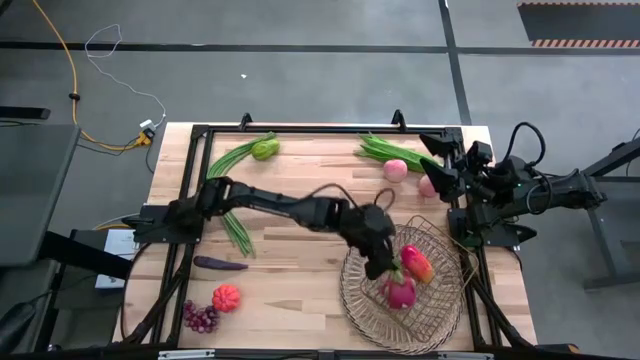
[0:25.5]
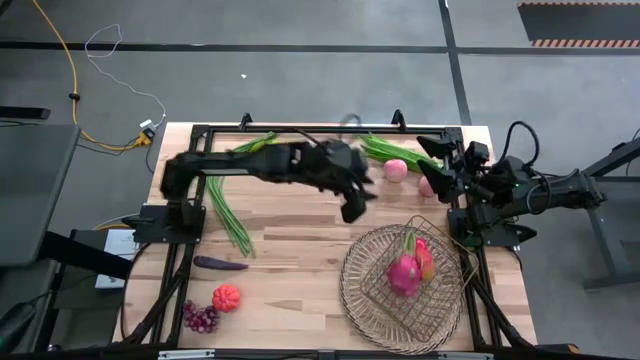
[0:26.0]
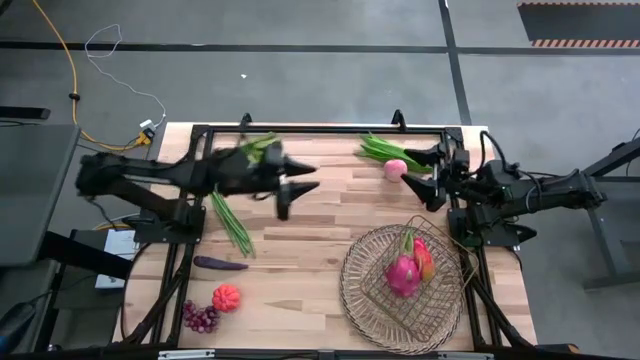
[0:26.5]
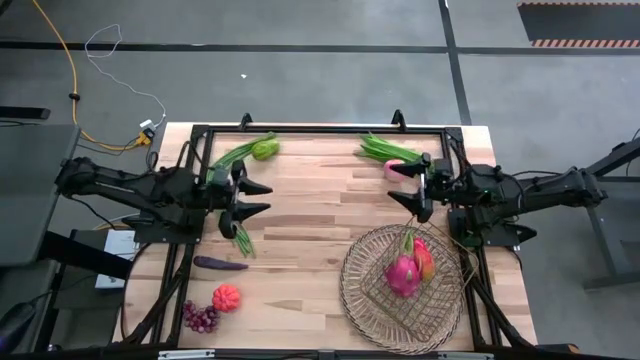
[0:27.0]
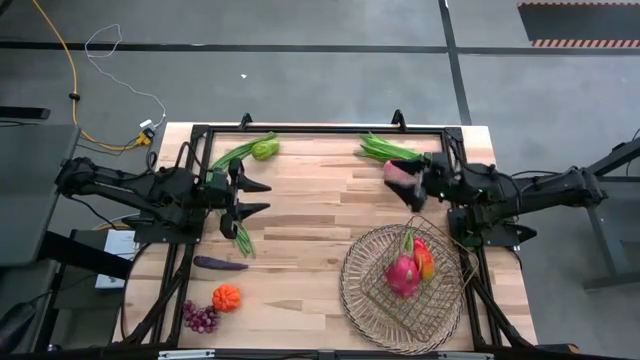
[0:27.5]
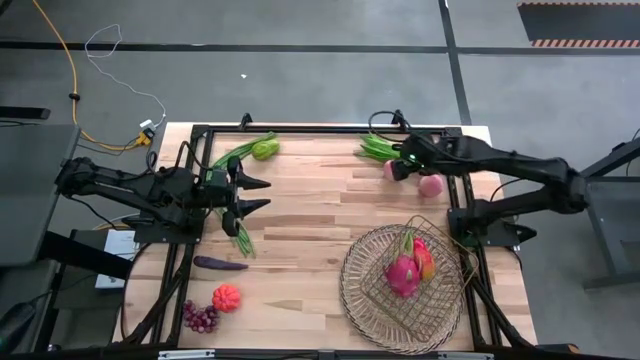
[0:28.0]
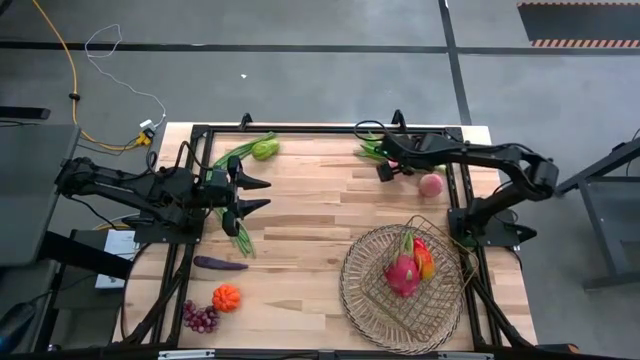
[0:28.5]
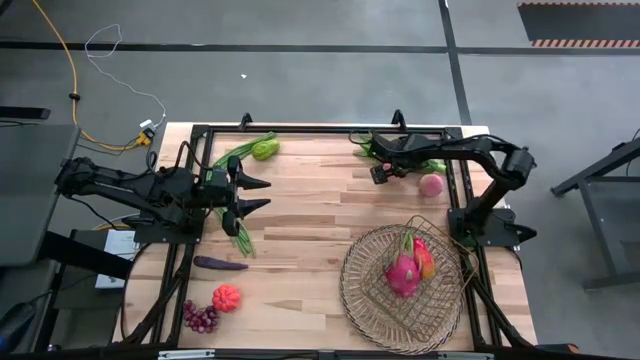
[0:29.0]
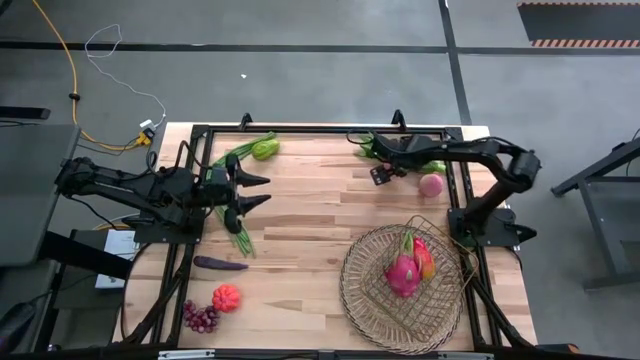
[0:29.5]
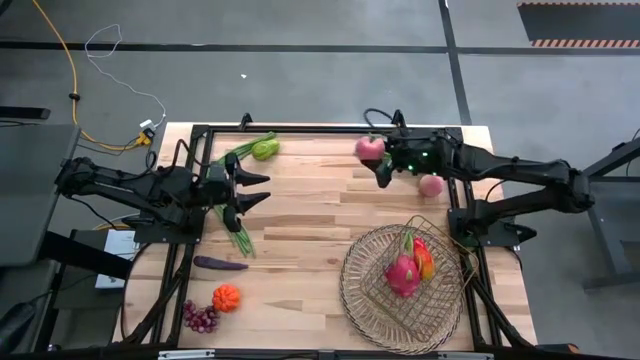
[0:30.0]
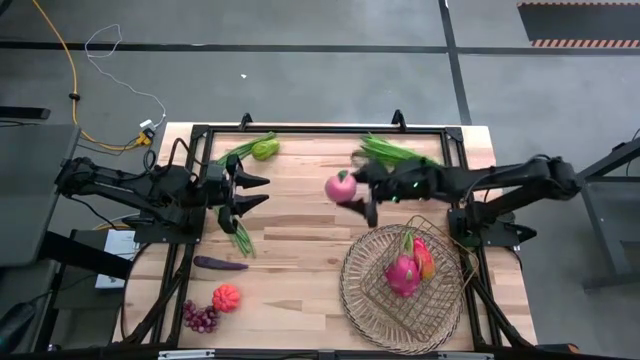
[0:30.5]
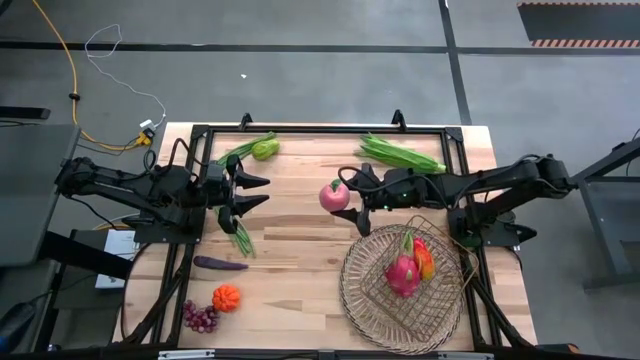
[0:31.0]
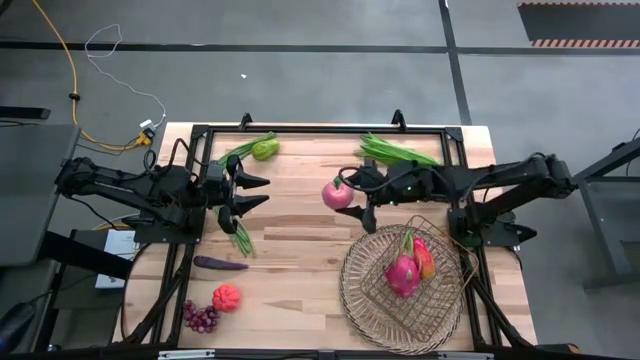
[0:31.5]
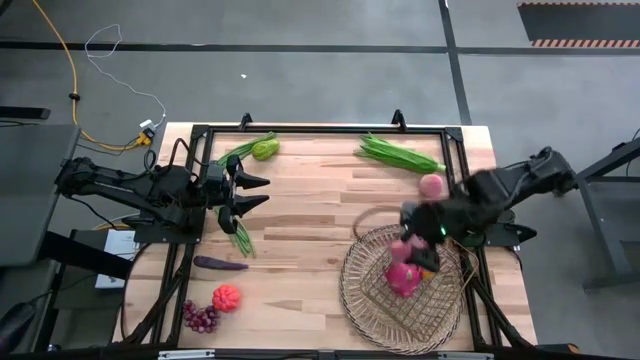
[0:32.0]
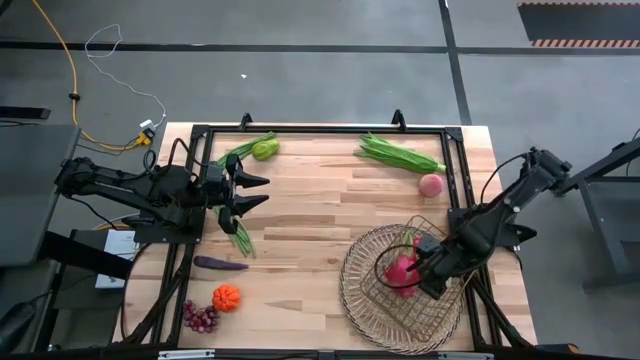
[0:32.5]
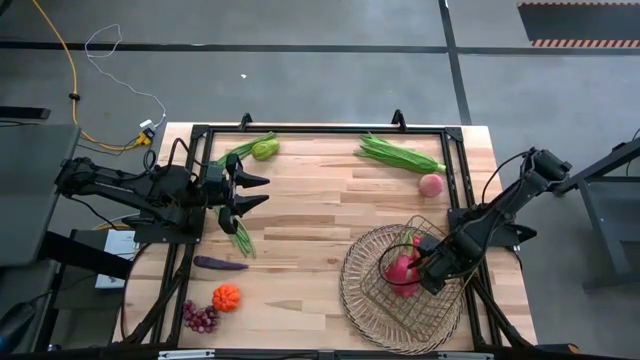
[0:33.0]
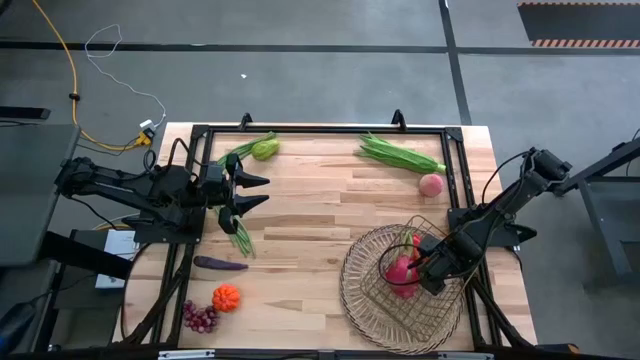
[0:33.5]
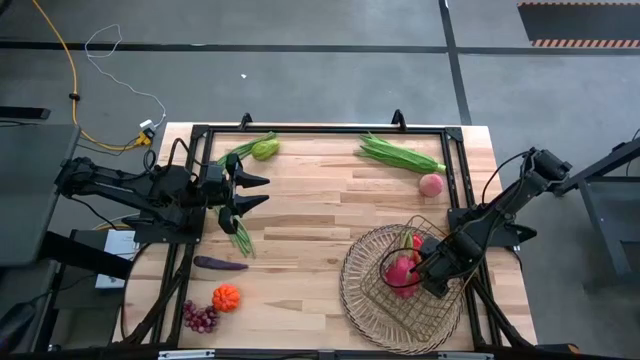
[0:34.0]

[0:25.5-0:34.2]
Task: Build produce basket
Put the left peach into the wire basket

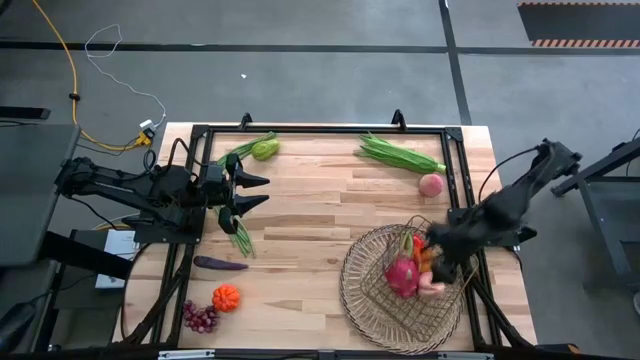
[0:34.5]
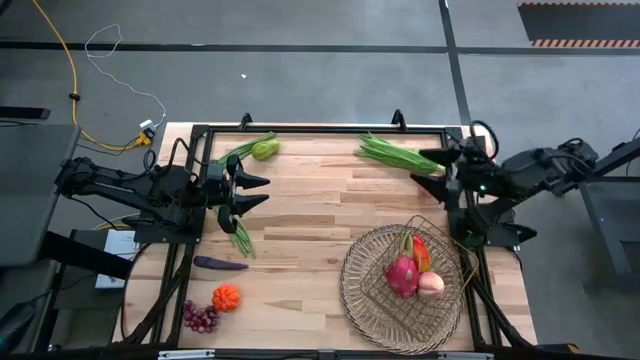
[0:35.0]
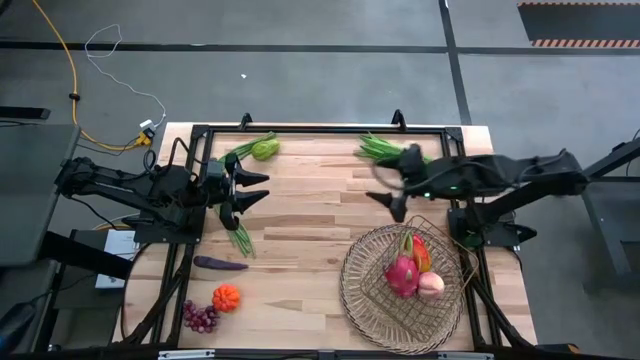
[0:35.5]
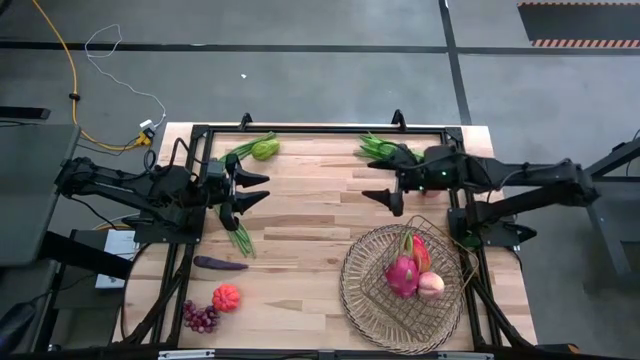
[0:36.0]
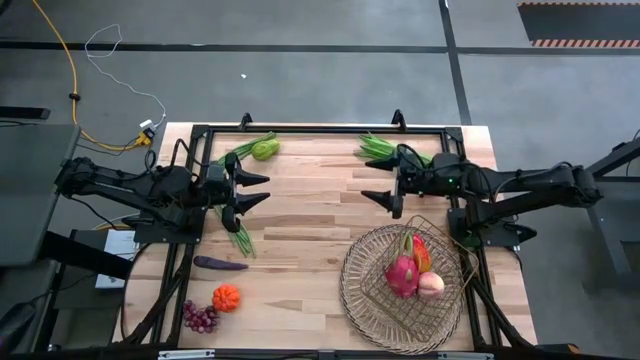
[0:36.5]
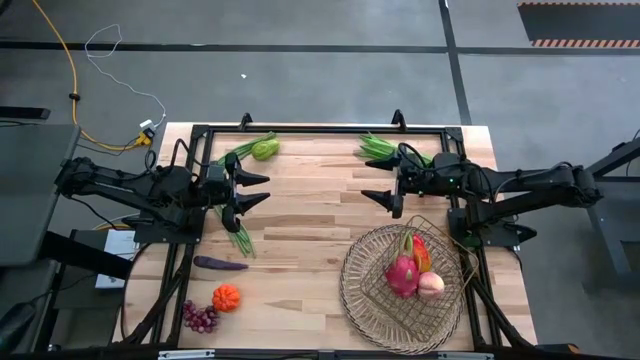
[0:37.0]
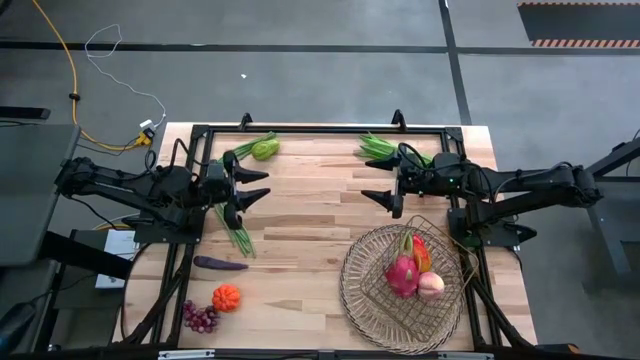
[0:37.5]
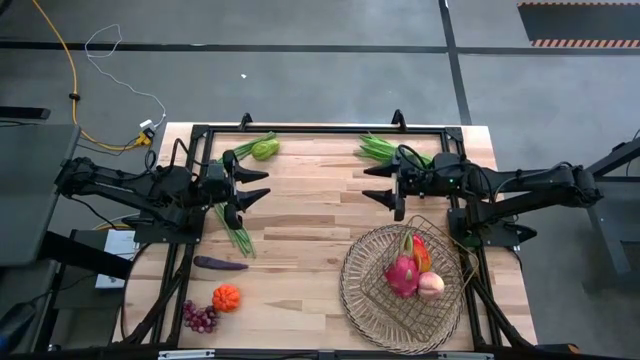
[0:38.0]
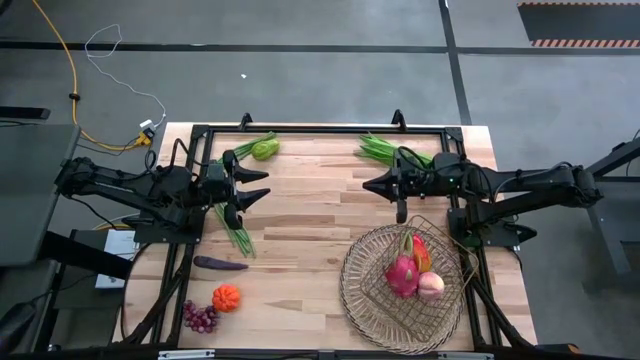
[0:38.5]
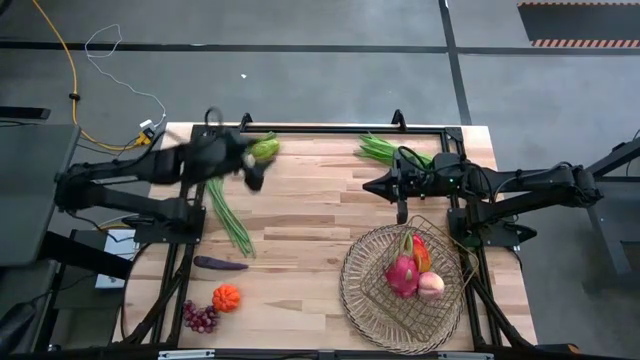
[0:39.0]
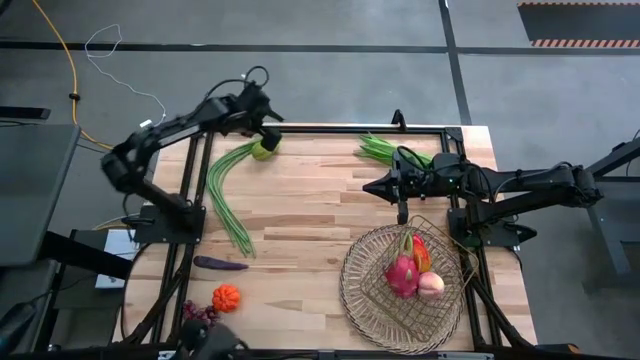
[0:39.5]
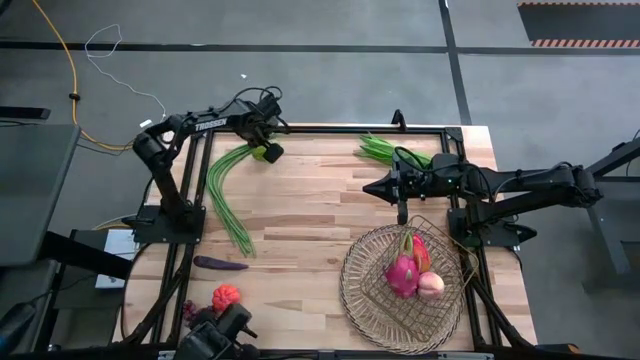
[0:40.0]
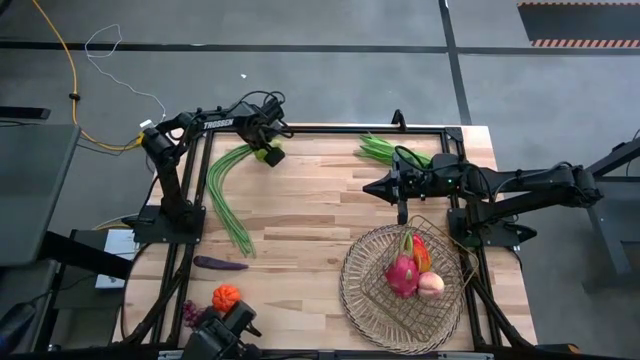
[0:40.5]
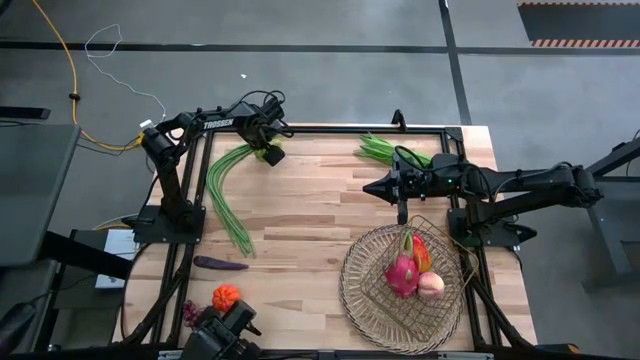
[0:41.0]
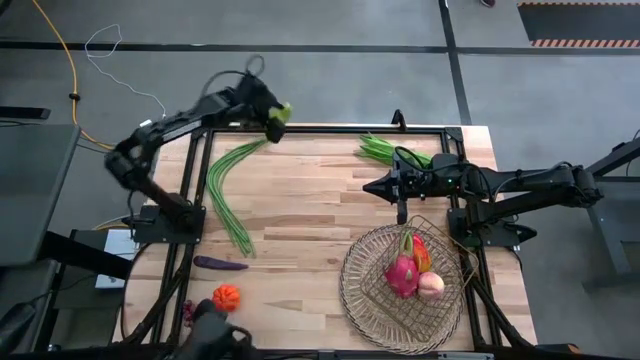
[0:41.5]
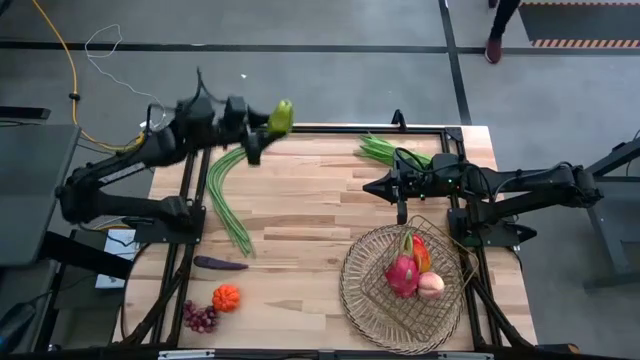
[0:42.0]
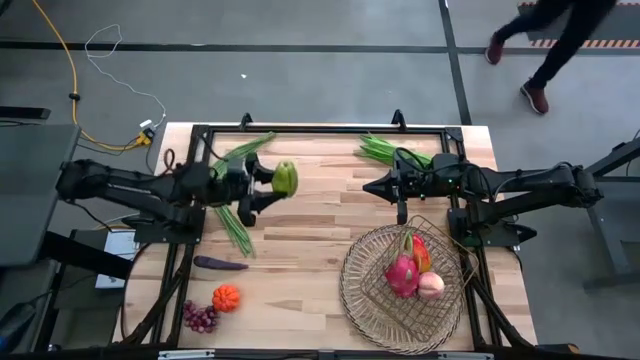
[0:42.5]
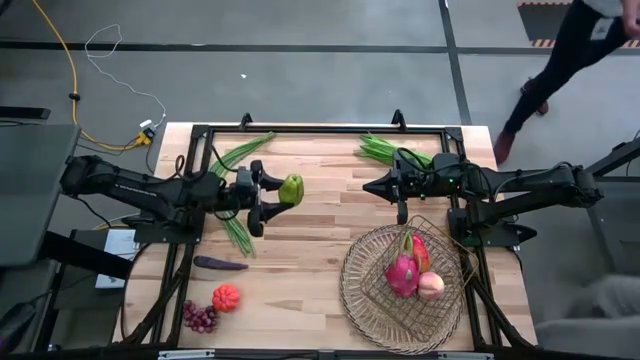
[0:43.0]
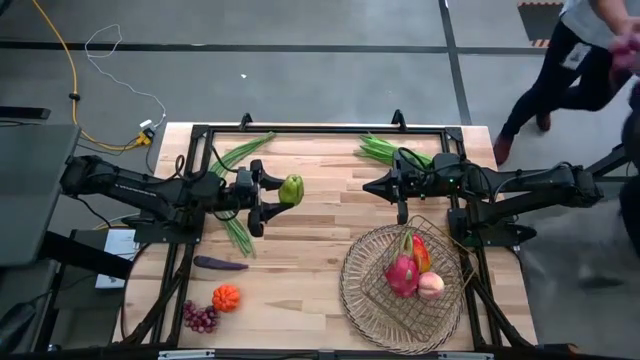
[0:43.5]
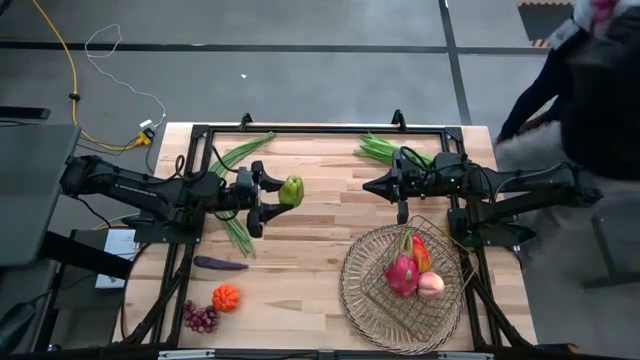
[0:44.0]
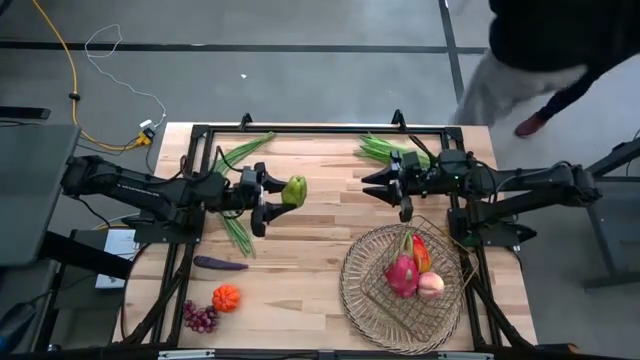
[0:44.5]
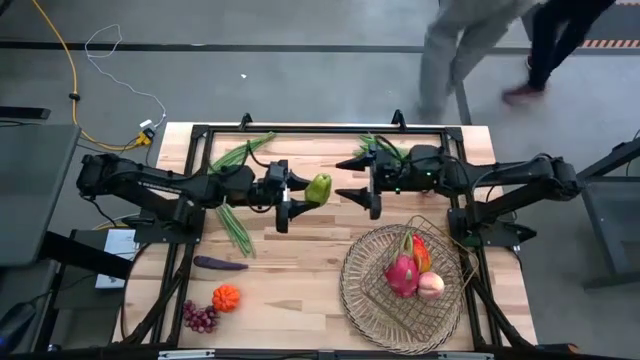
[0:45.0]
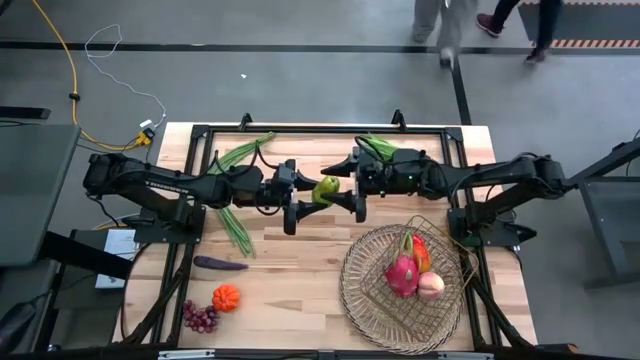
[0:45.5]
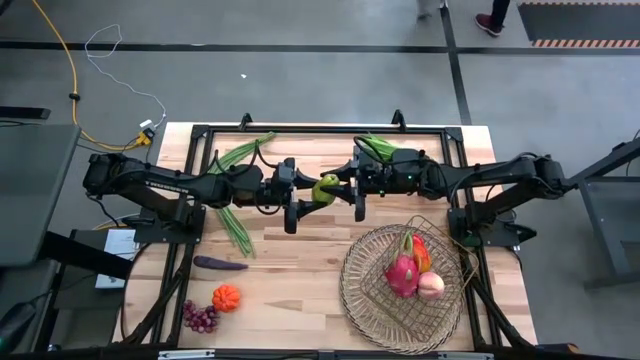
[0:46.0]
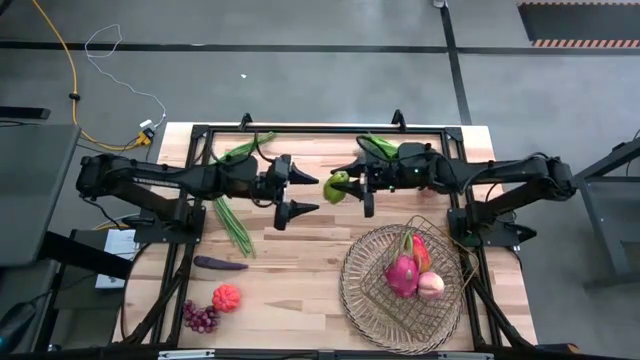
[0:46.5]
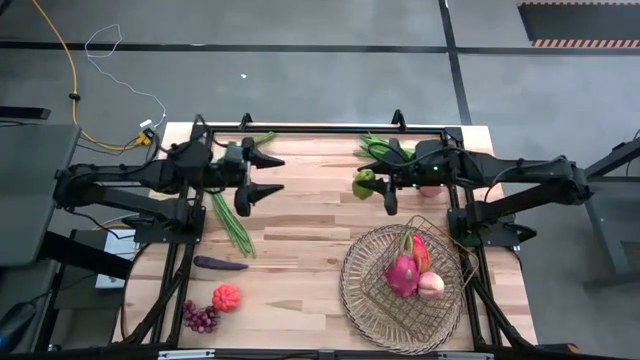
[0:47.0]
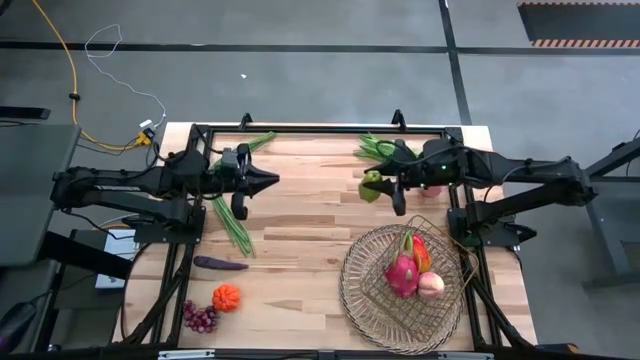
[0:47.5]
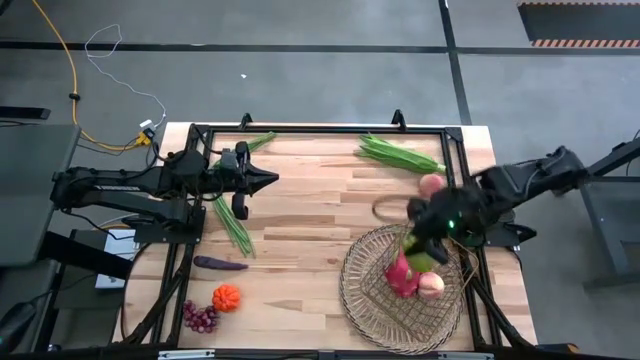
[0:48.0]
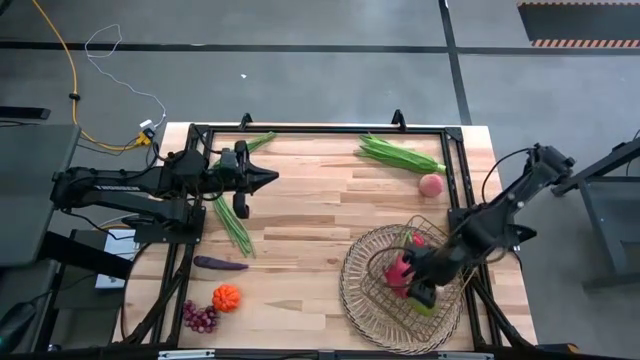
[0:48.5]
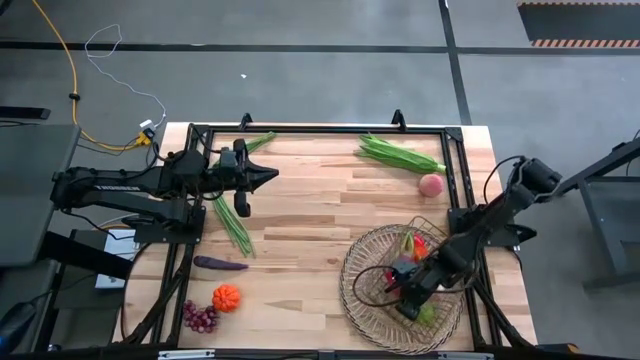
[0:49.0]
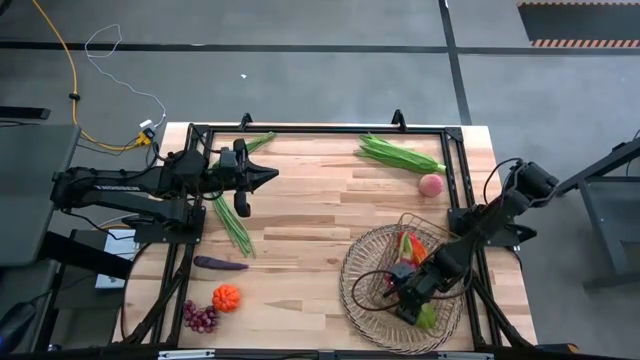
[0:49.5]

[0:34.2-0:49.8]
Put the chayote into the wire basket
